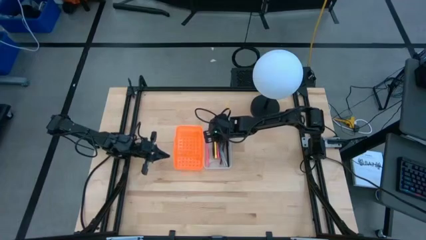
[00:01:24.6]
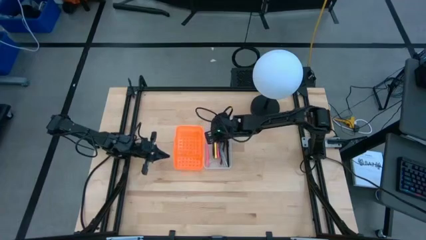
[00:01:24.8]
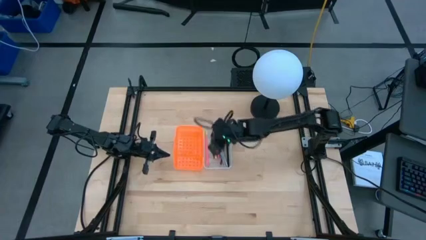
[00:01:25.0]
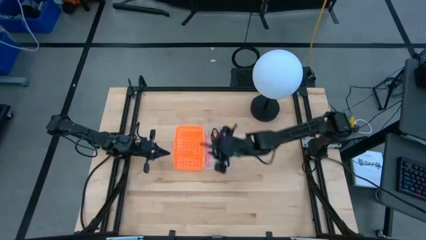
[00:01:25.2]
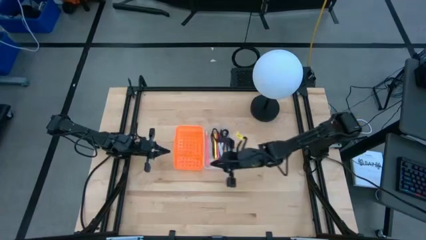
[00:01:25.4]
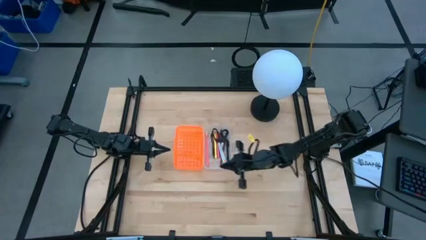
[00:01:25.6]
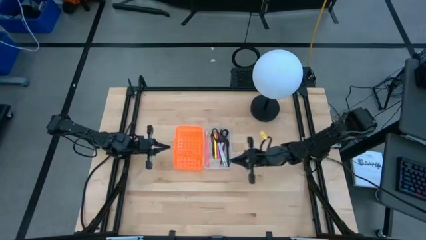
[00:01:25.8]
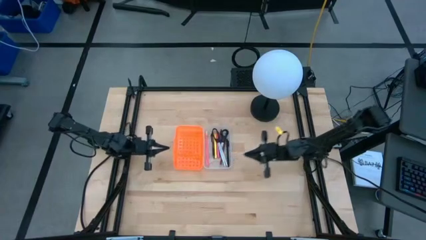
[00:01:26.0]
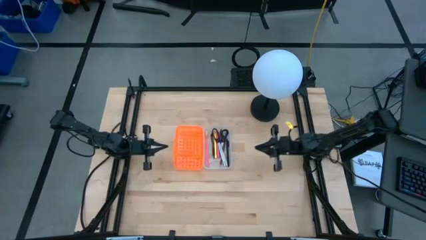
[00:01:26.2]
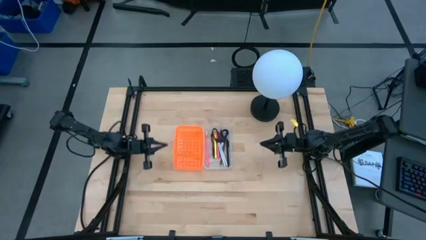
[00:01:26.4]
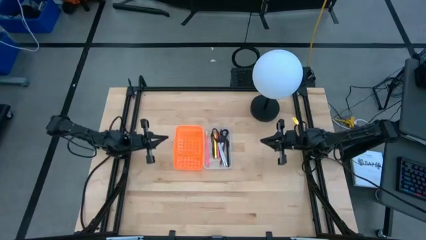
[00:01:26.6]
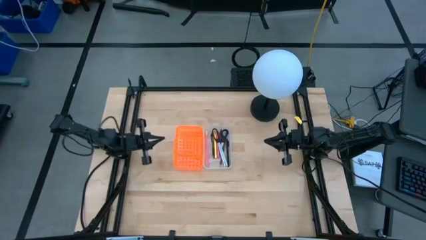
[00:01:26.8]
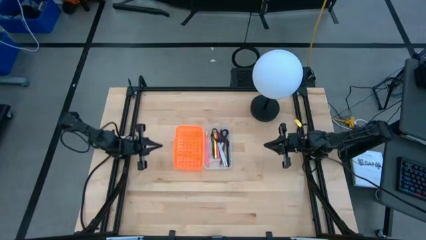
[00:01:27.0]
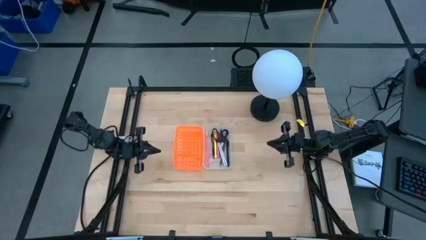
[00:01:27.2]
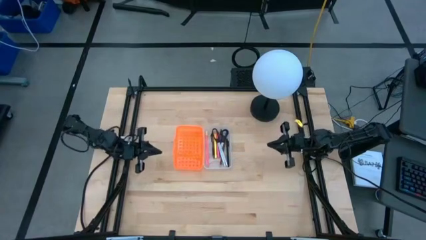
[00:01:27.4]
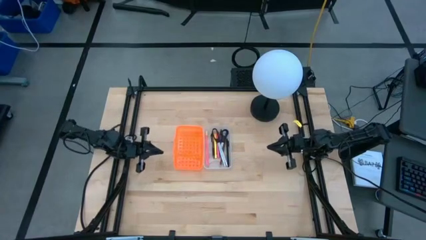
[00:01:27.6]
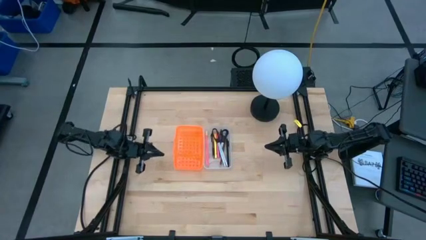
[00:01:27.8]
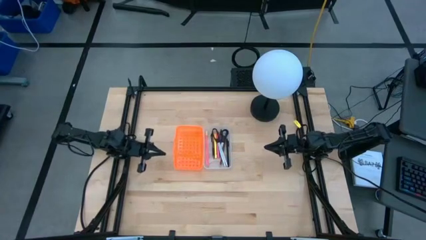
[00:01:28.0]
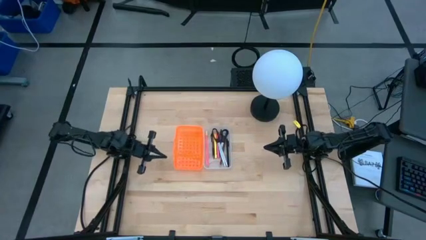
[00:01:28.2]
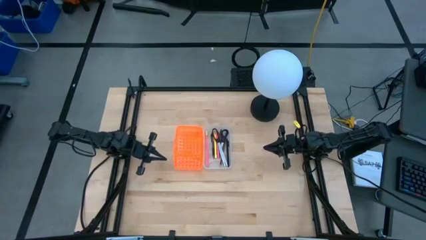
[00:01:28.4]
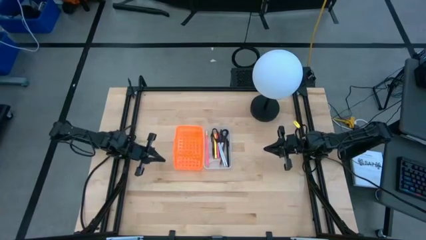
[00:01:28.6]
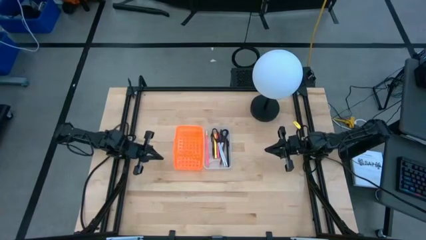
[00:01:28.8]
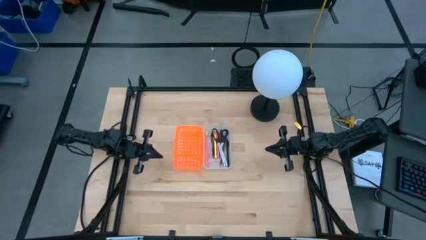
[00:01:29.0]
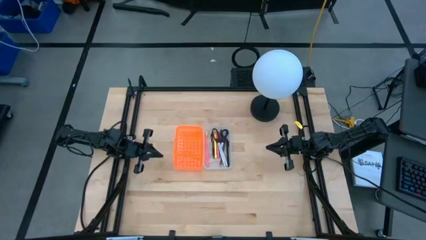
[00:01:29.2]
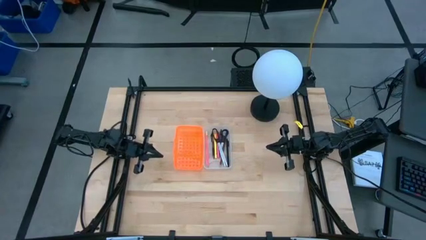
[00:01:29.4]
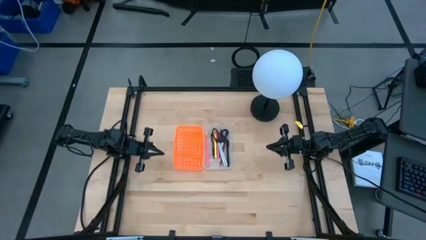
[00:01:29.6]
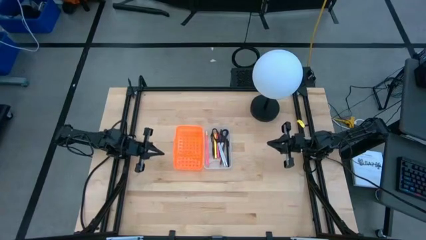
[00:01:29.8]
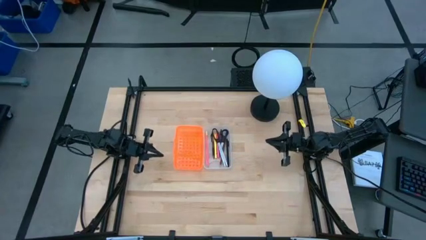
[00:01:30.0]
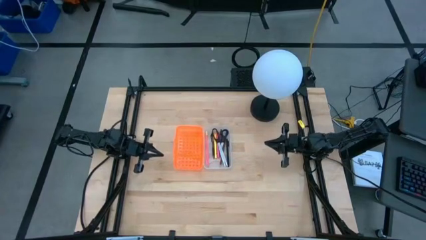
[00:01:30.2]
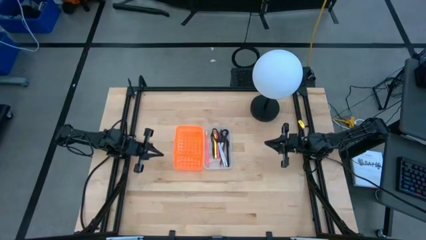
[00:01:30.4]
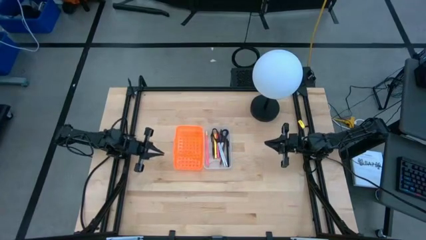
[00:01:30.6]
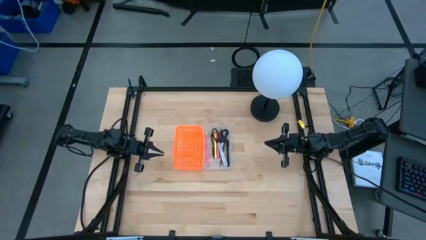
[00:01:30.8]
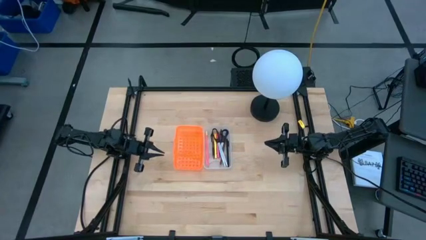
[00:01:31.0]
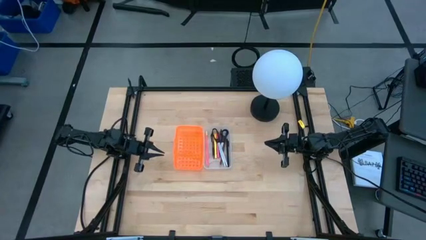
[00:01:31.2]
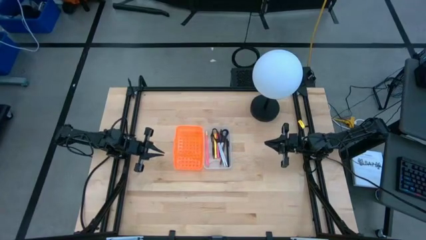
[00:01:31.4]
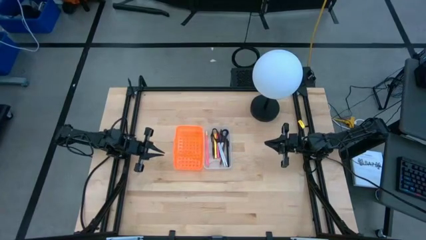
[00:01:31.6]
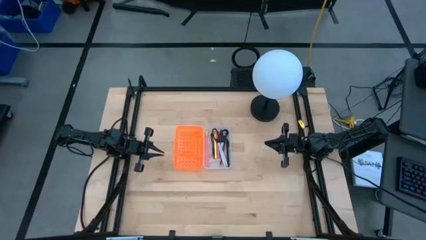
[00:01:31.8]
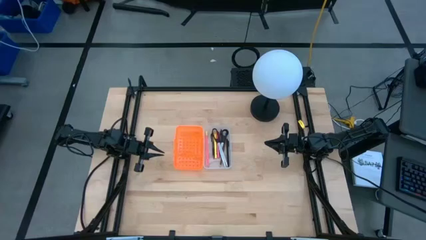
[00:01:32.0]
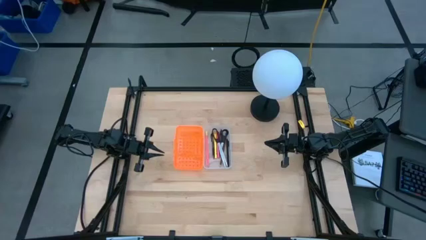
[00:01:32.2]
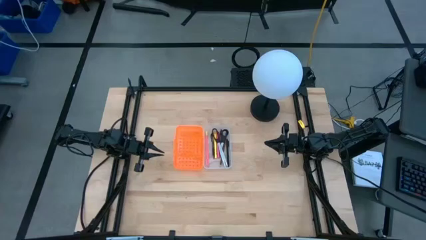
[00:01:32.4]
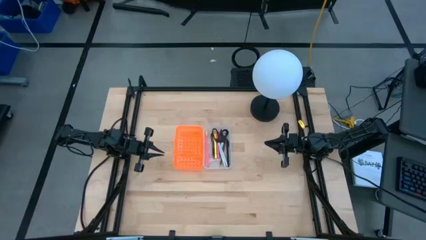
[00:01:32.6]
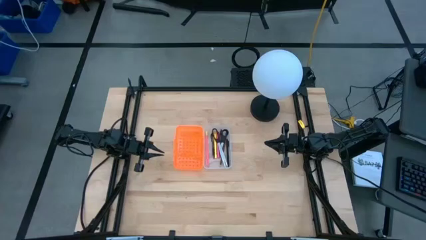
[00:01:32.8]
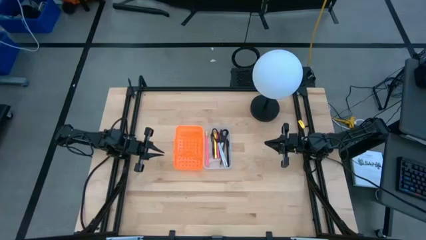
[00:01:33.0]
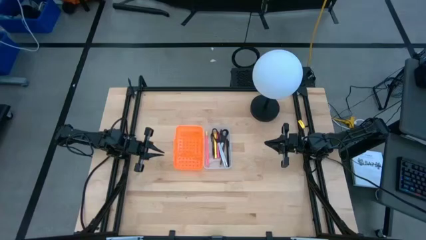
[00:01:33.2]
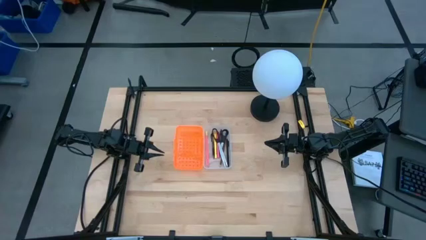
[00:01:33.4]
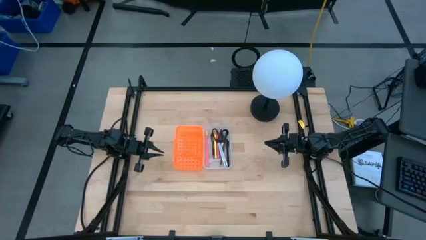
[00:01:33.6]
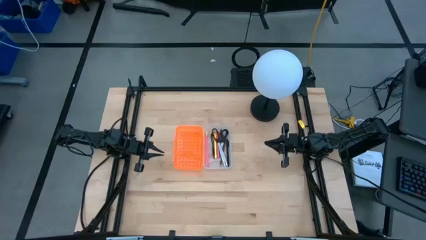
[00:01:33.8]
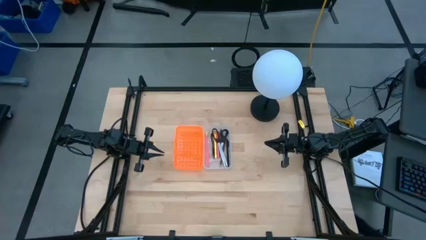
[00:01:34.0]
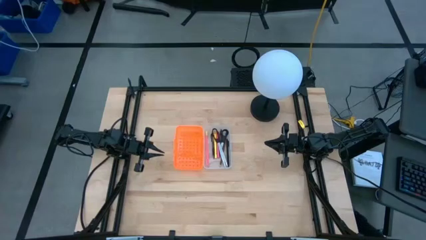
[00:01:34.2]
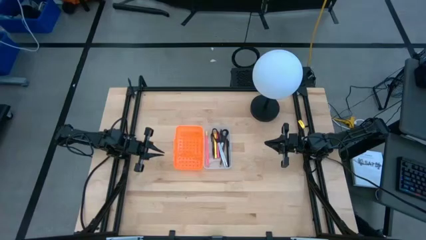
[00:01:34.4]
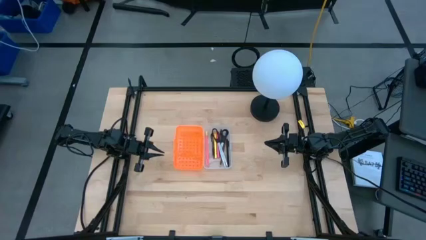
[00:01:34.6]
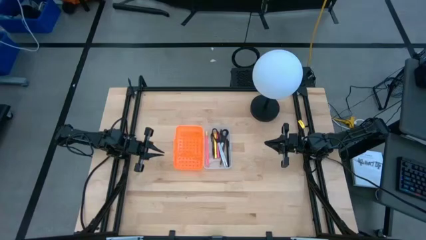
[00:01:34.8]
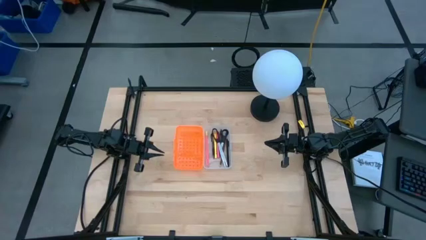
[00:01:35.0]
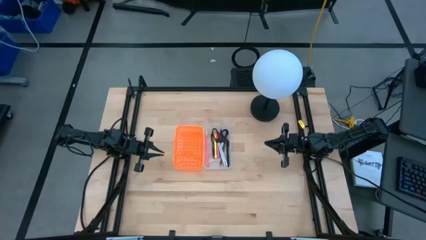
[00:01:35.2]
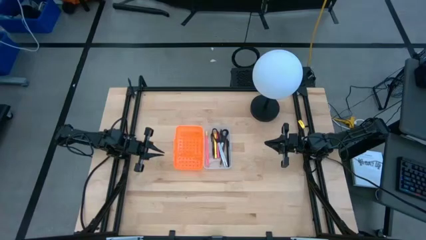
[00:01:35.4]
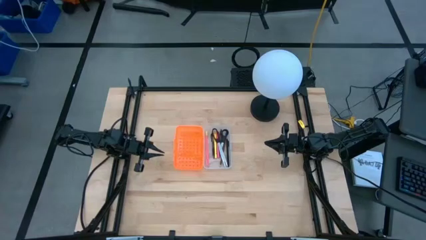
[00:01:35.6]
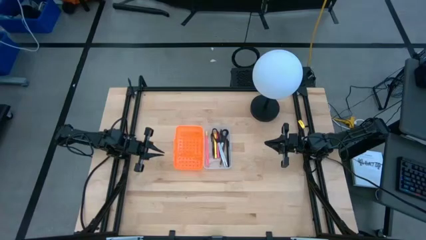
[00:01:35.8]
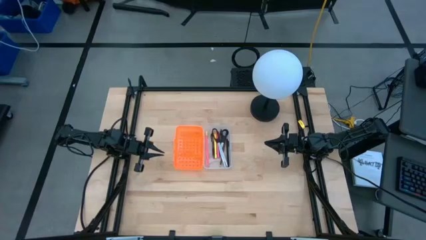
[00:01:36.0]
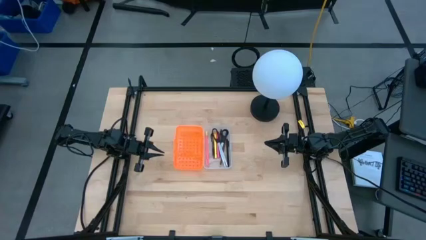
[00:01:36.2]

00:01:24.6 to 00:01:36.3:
Task: Pick & place school supplies into a supply box
Return to Home Position
